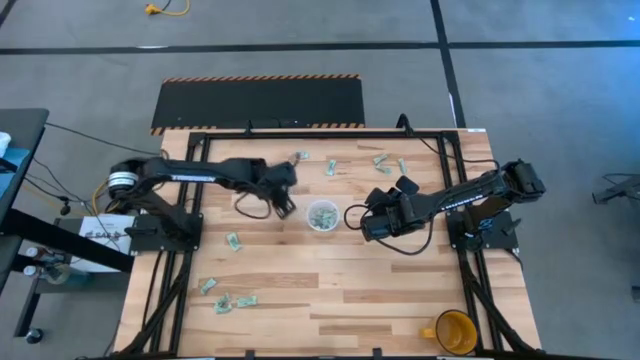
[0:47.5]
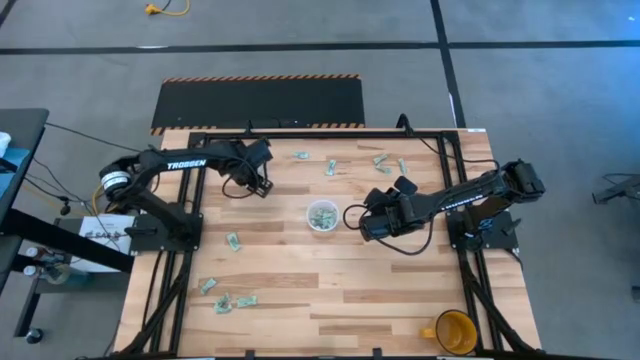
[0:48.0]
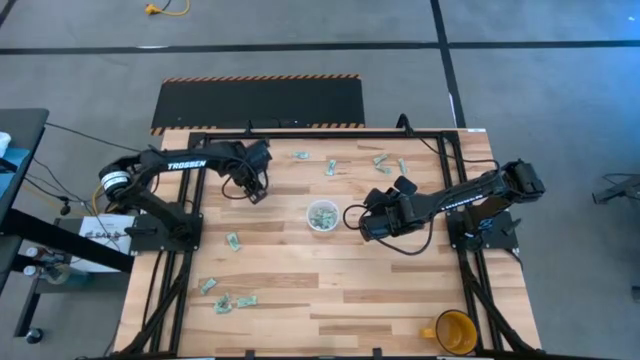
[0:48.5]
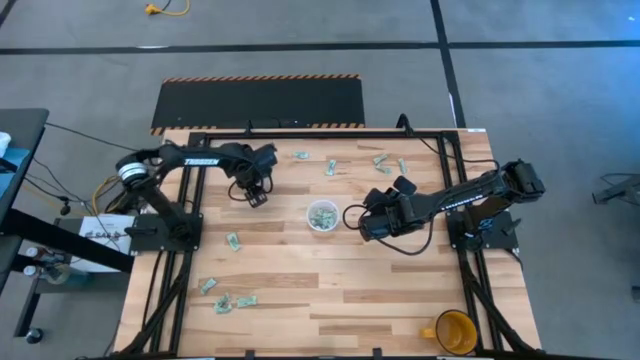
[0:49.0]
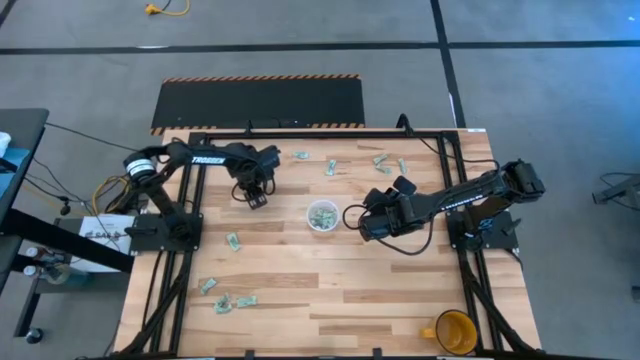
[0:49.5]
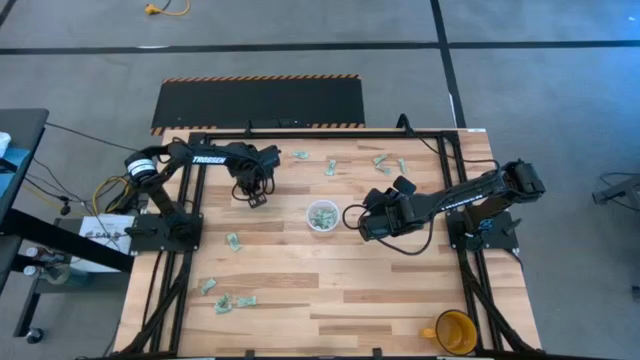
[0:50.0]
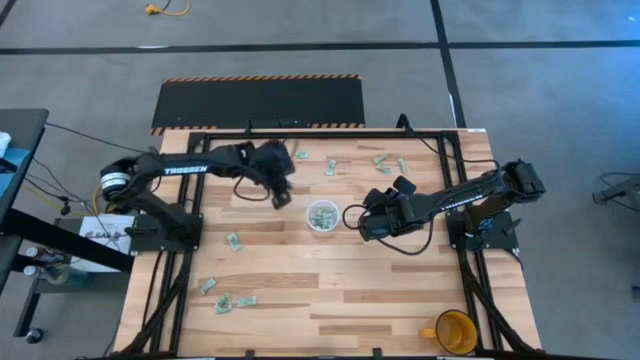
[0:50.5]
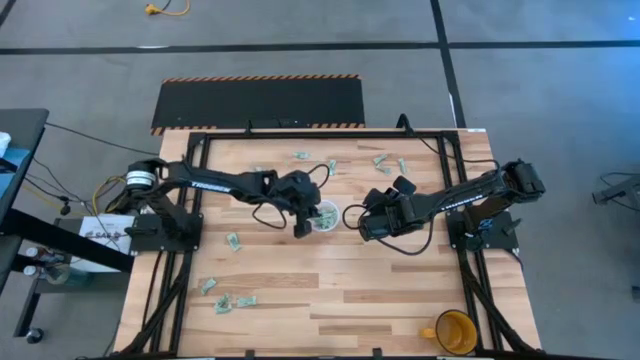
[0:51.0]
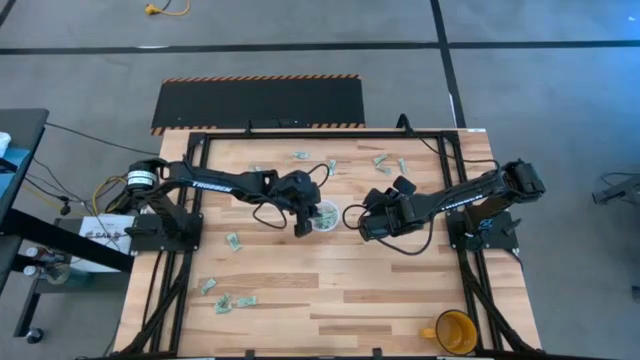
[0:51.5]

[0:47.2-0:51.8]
Task: Pick and place Stevia / Truvia into bins
Put the green stevia packet into the transparent container

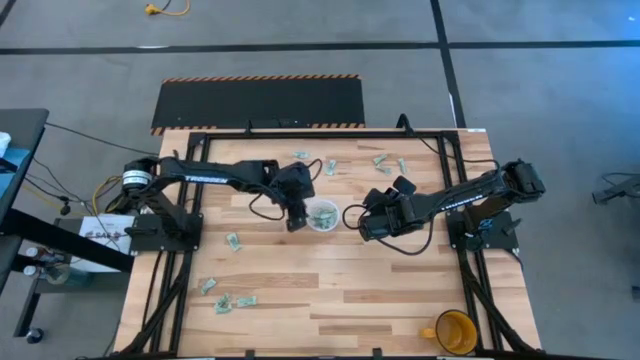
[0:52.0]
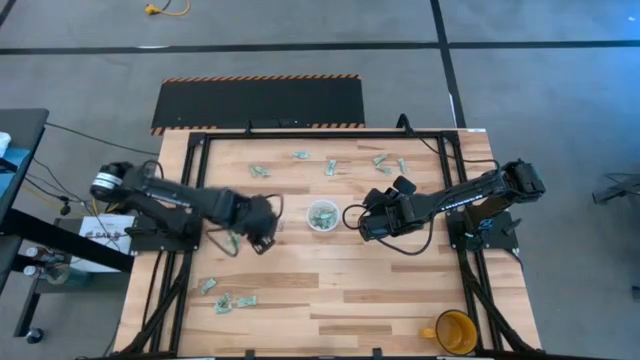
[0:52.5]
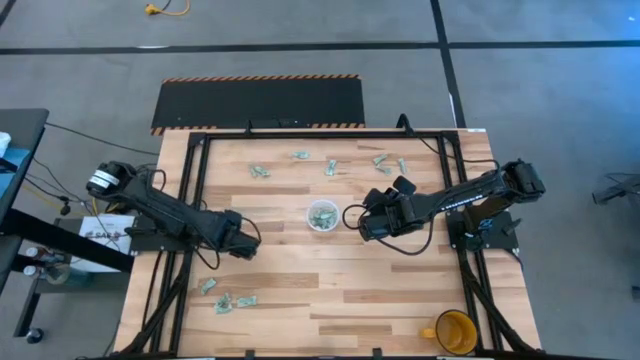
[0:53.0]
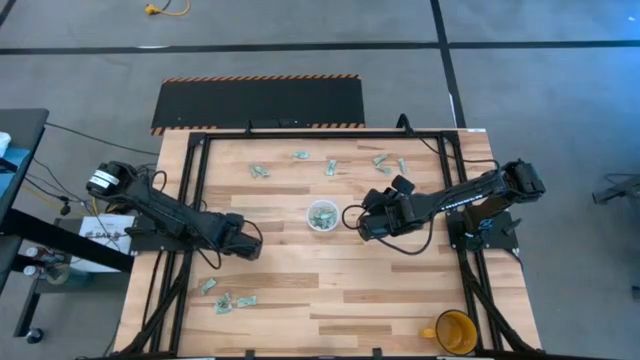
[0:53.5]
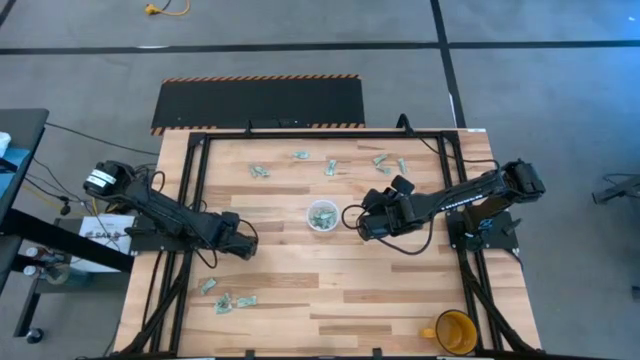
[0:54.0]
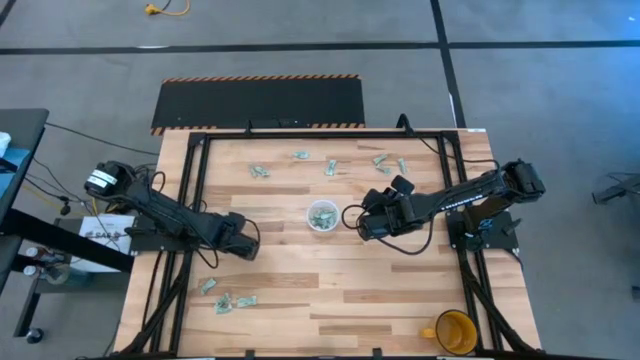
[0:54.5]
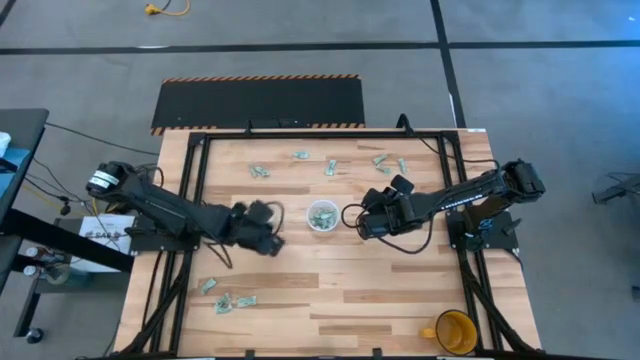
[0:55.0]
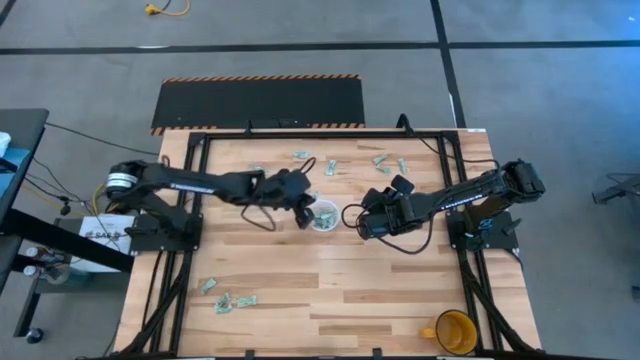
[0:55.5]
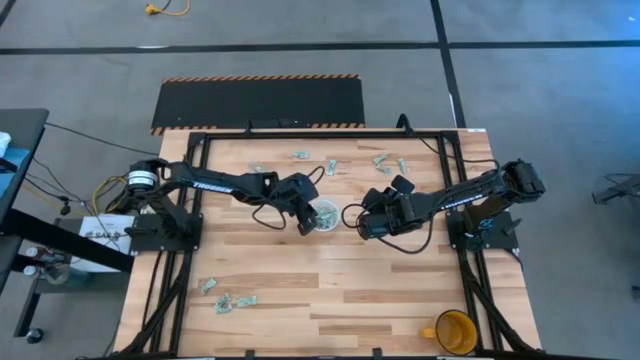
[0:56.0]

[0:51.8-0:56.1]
Put the green stevia packet into the transparent container

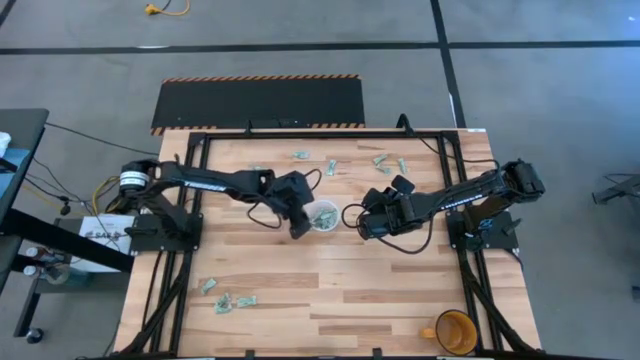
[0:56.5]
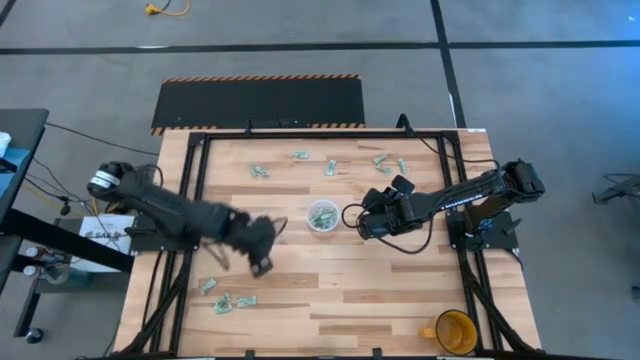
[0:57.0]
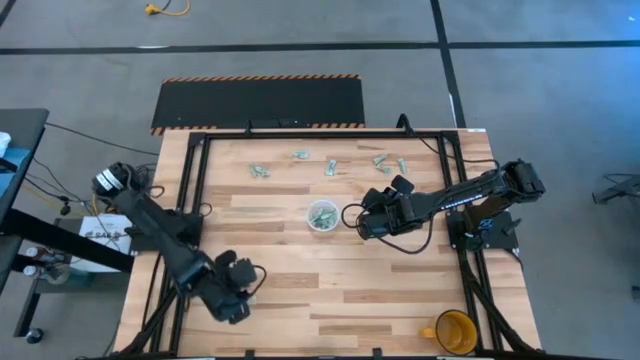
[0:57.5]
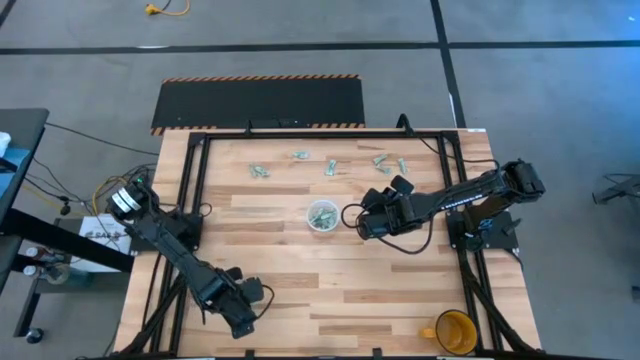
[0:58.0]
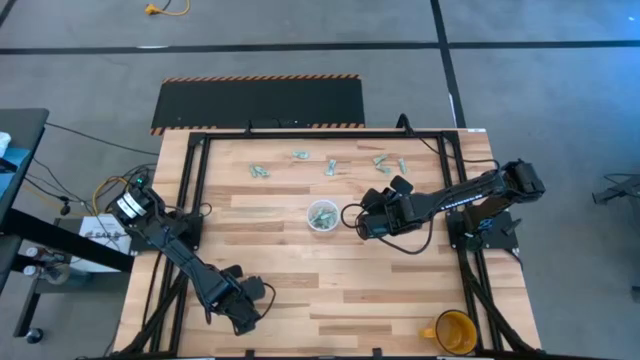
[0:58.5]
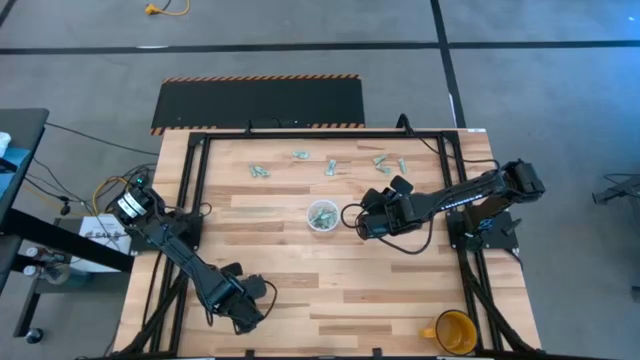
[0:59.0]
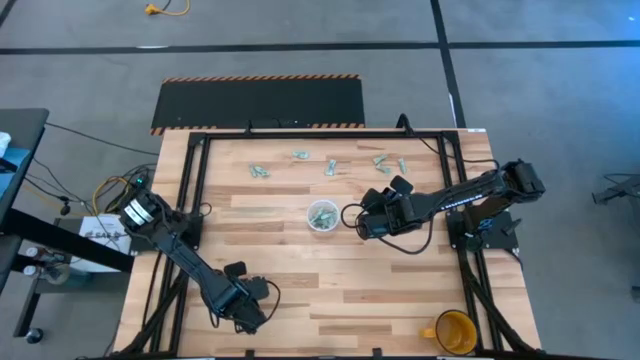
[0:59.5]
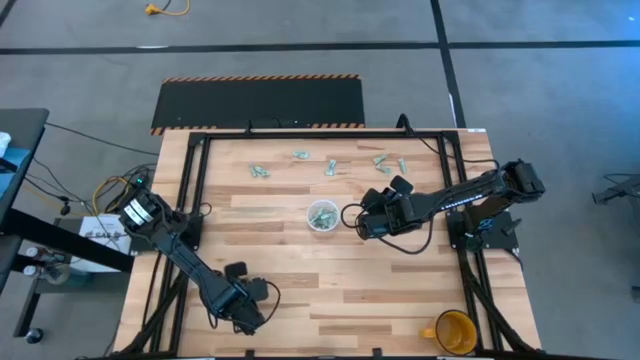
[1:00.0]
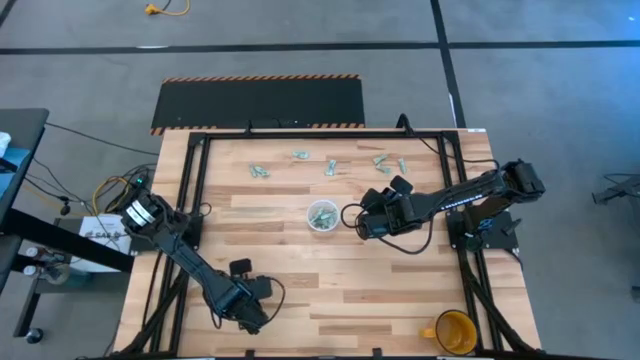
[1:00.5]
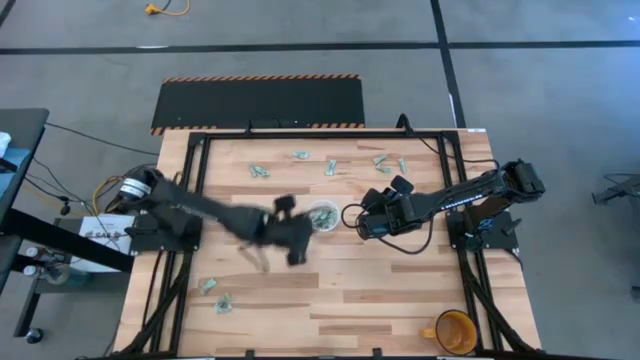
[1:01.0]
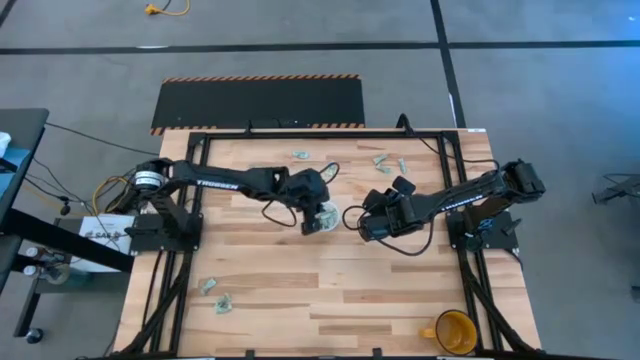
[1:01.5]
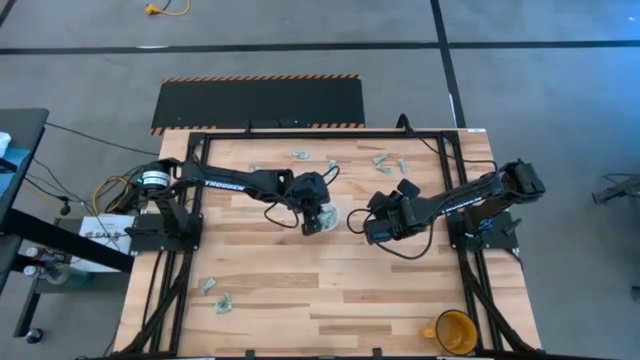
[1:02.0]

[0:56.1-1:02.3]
Put the green stevia packet into the transparent container

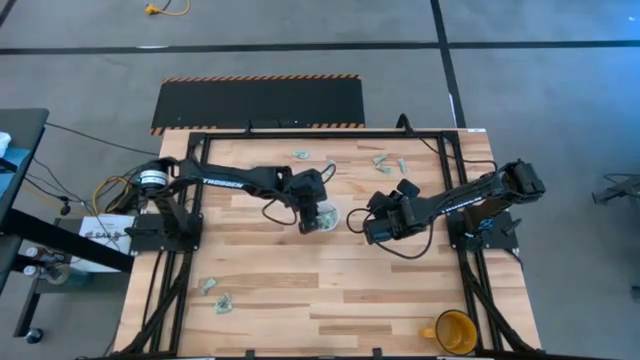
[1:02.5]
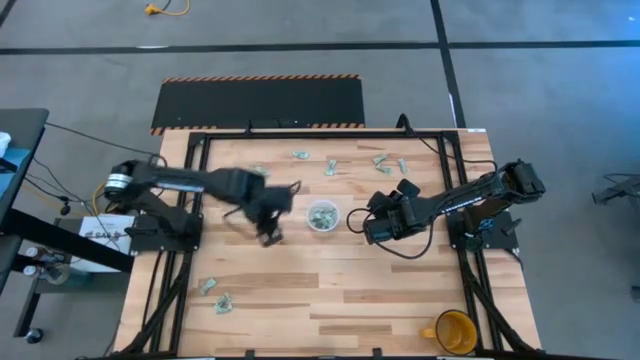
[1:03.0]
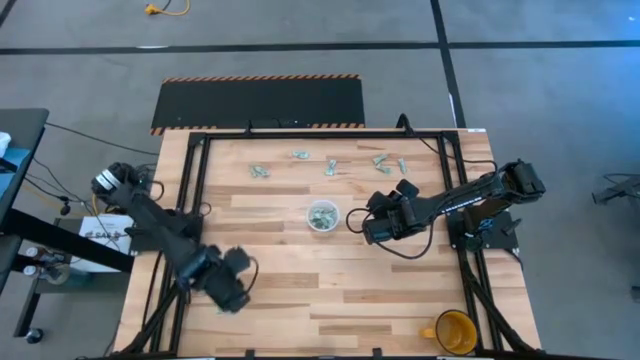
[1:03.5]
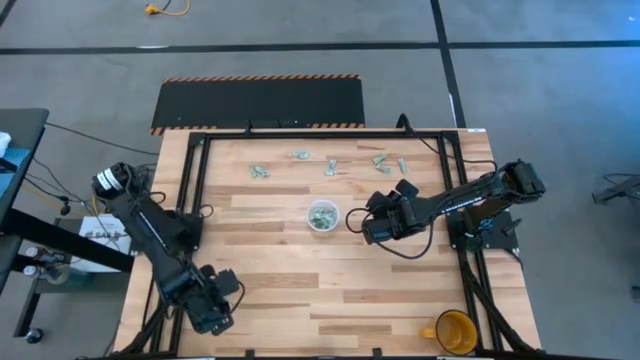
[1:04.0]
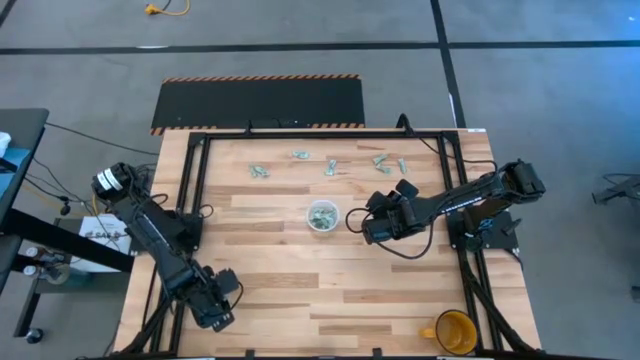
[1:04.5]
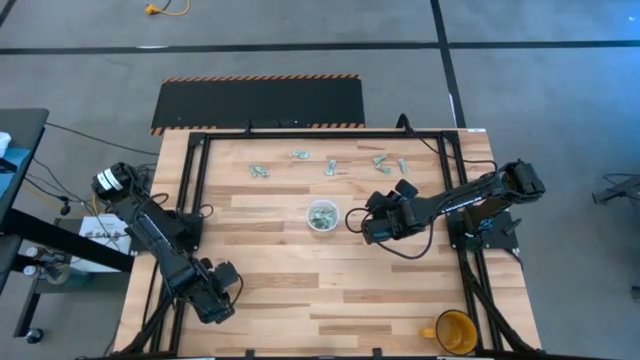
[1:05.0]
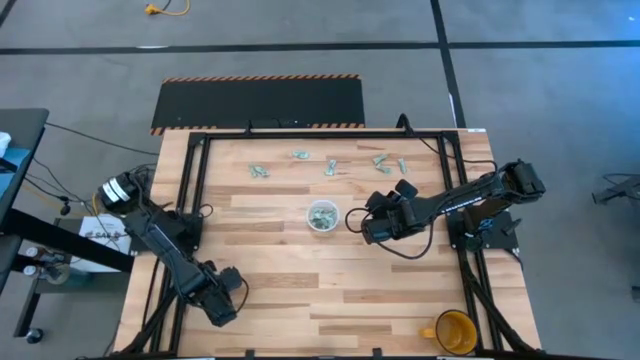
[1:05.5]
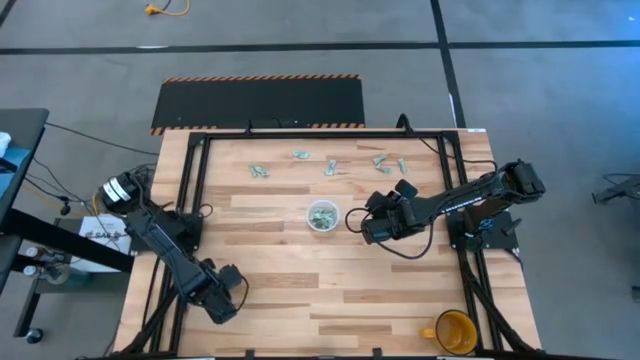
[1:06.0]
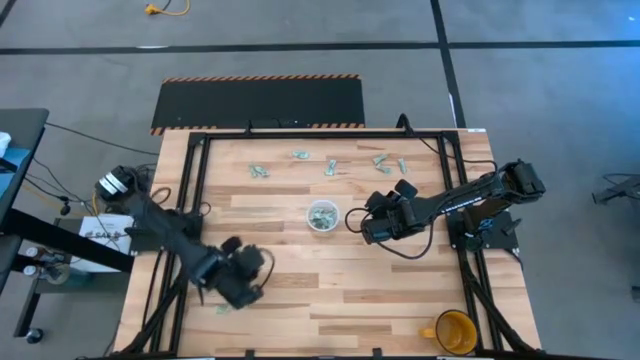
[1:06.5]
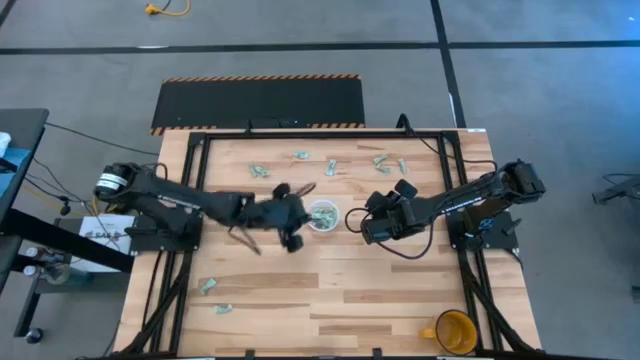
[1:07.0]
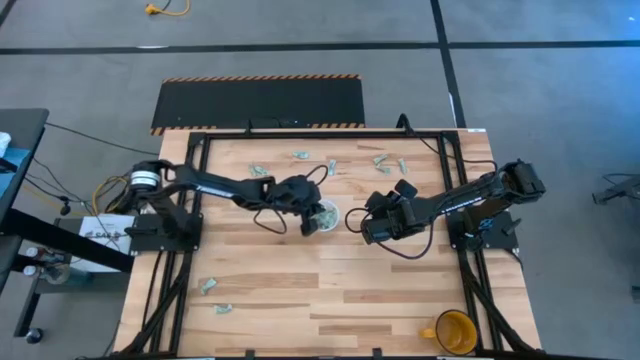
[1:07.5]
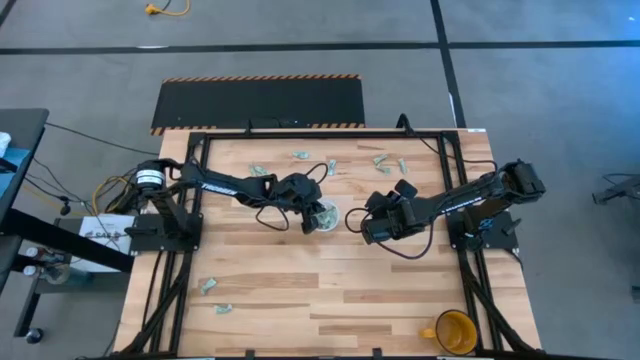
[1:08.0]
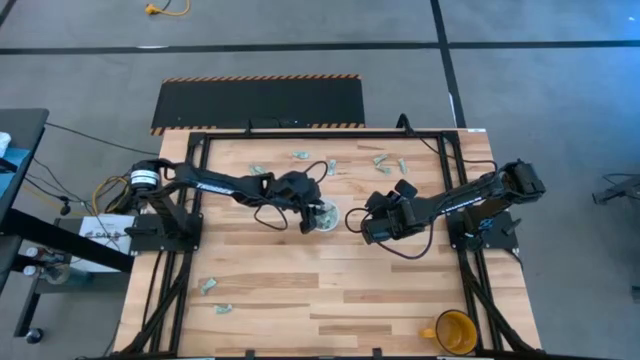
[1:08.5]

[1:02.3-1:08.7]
Put the green stevia packet into the transparent container
